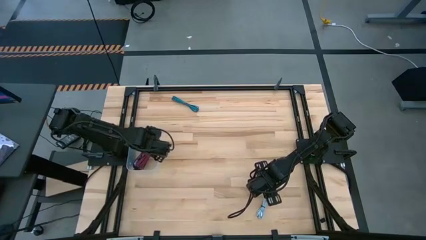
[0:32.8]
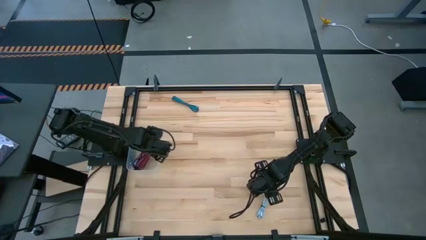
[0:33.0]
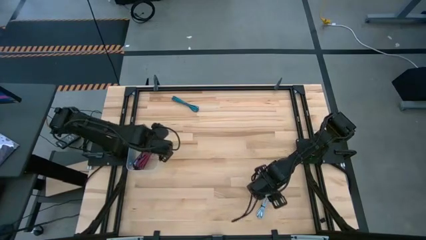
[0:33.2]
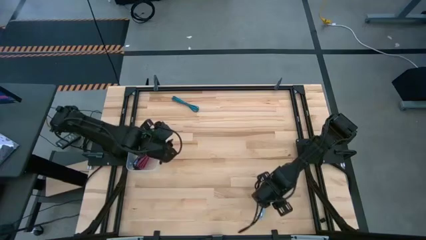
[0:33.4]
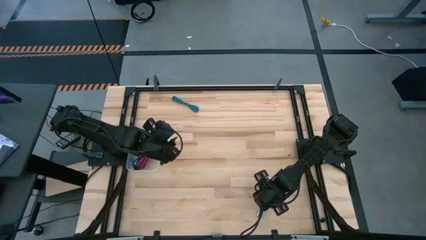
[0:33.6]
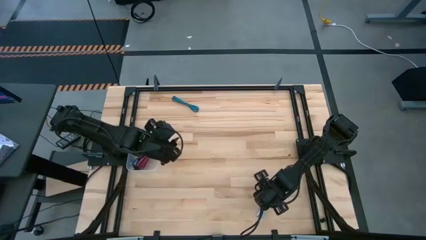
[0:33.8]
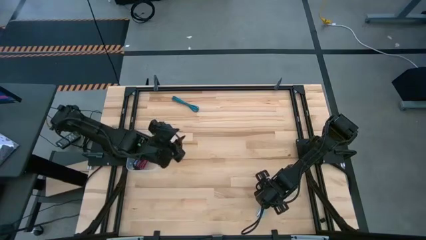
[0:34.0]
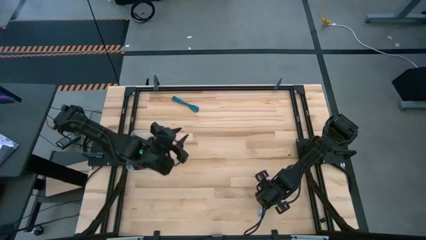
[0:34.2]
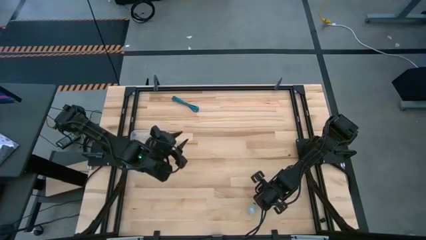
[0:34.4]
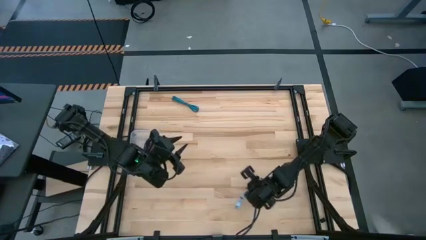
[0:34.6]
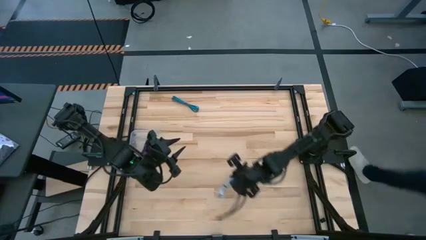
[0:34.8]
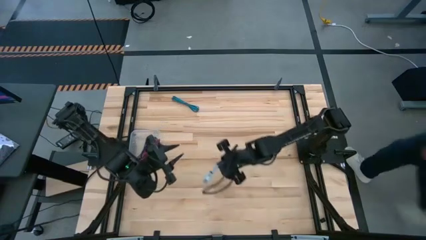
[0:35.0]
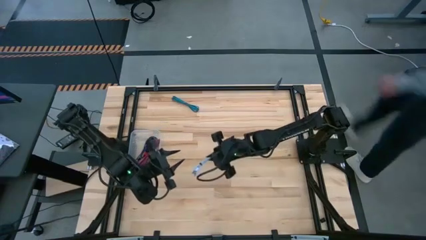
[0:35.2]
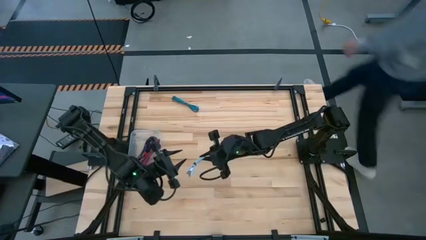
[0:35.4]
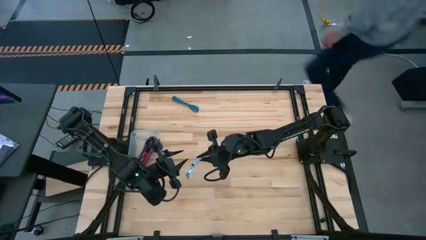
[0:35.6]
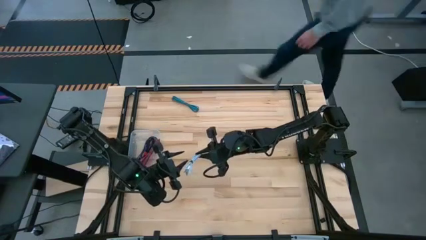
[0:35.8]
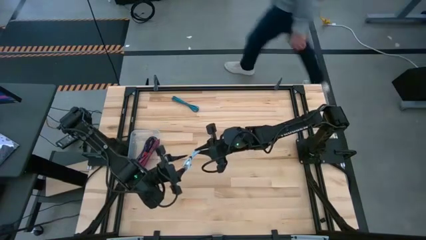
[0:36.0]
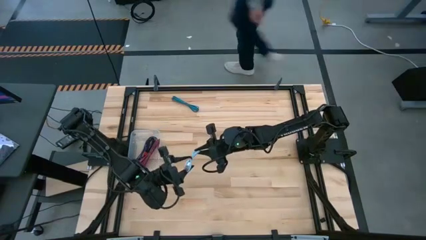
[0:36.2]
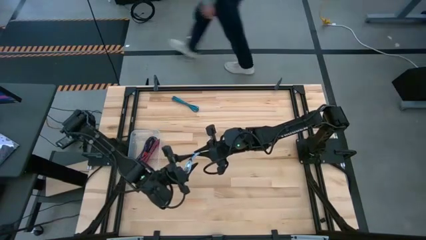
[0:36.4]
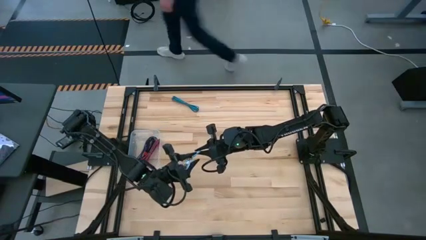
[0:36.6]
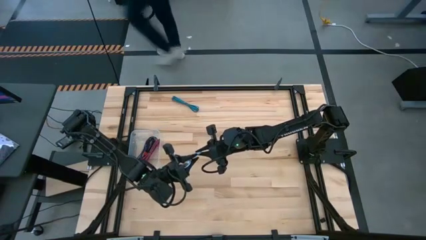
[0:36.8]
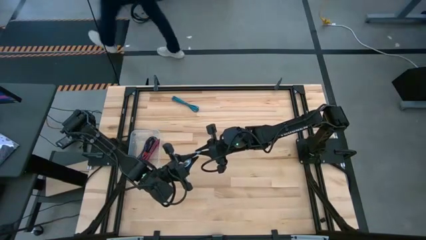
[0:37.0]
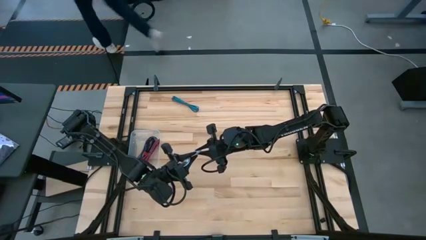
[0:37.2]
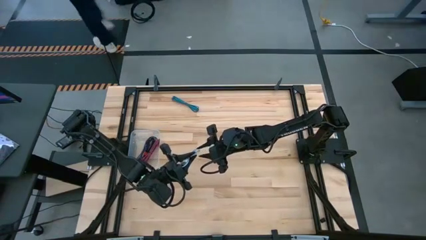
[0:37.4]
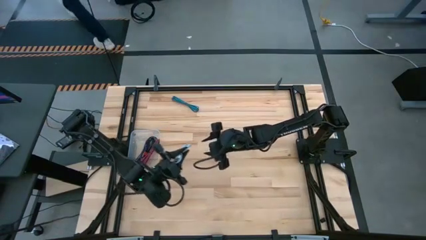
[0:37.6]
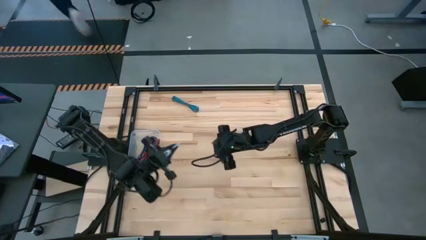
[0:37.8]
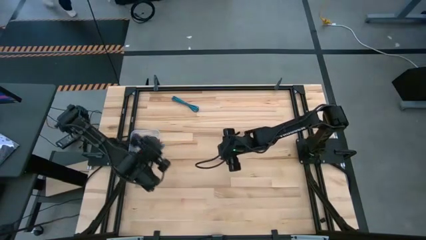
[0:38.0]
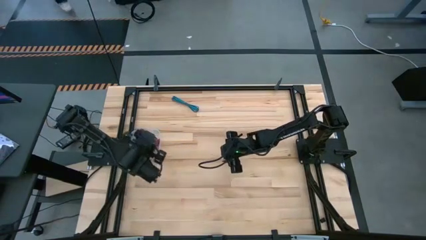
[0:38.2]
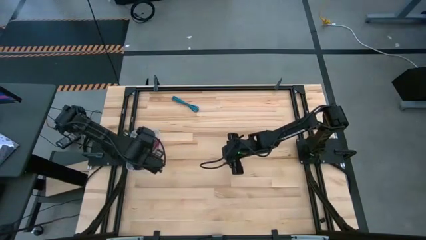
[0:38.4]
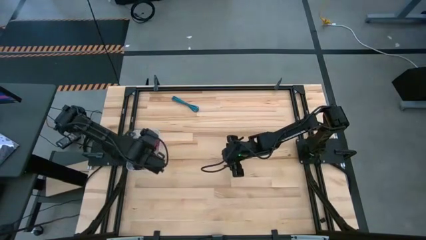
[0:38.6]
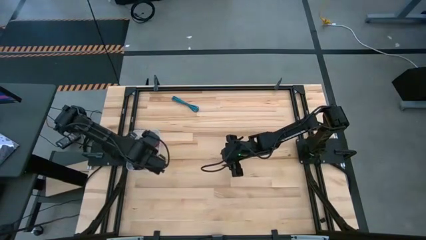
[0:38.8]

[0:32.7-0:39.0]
Task: Pick and place USB-C Cables
Put the light blue charger cable into the transparent bin

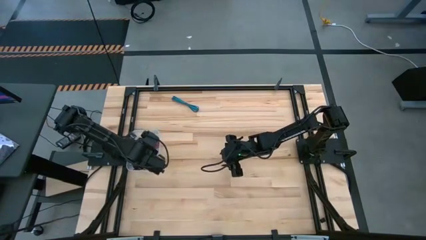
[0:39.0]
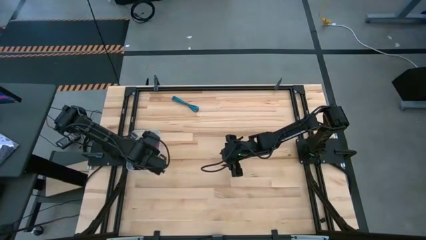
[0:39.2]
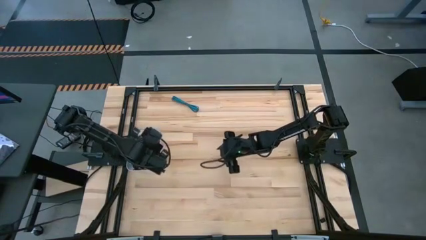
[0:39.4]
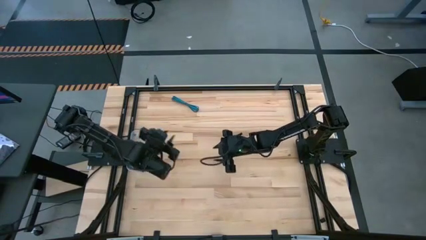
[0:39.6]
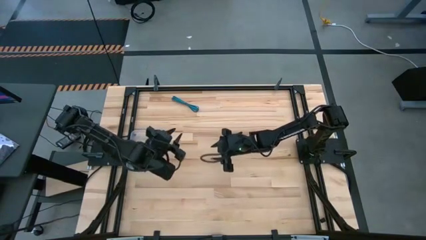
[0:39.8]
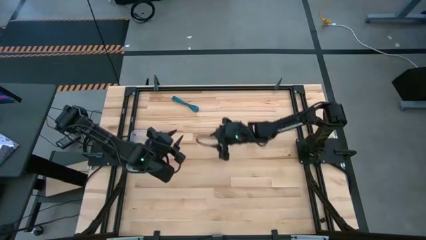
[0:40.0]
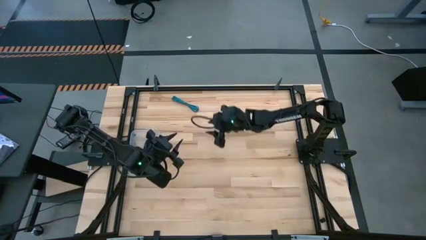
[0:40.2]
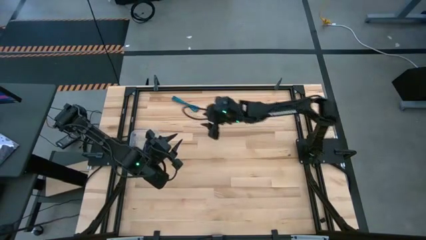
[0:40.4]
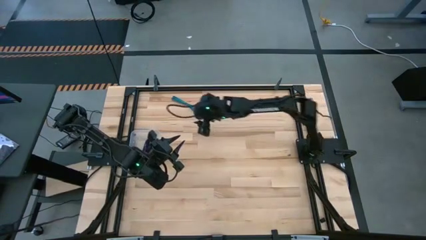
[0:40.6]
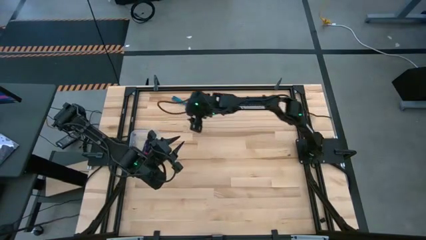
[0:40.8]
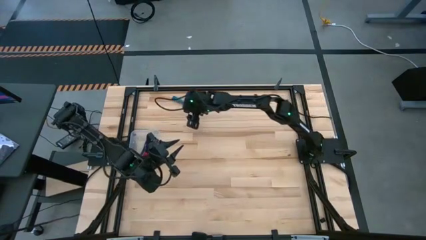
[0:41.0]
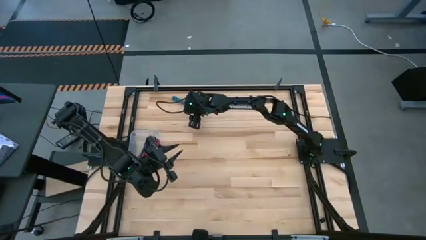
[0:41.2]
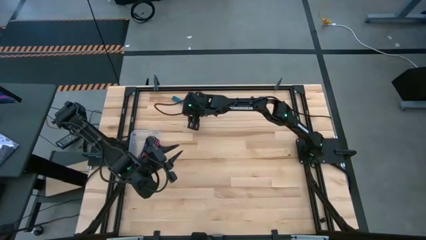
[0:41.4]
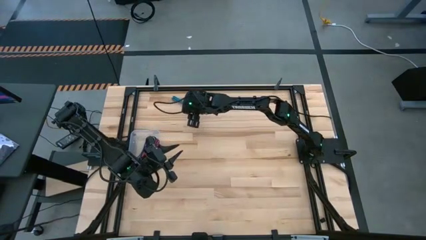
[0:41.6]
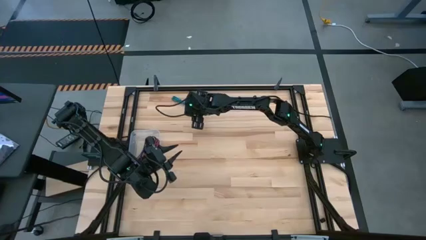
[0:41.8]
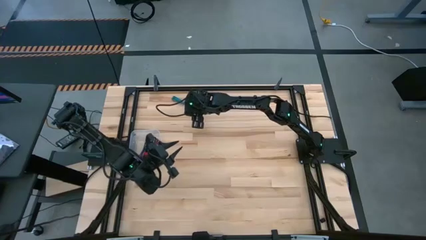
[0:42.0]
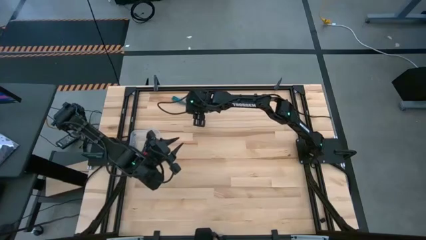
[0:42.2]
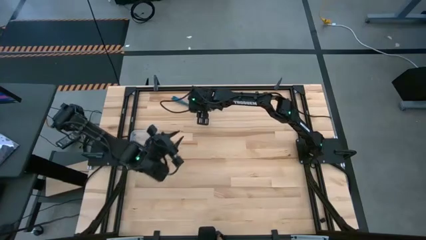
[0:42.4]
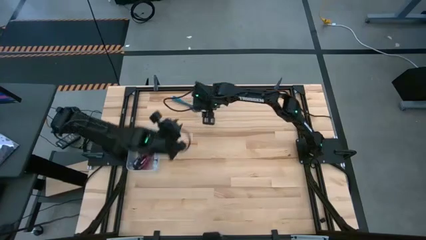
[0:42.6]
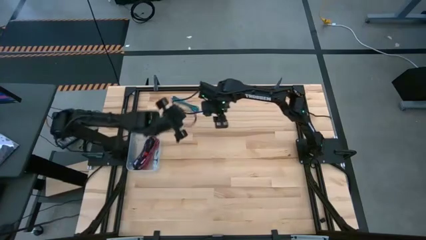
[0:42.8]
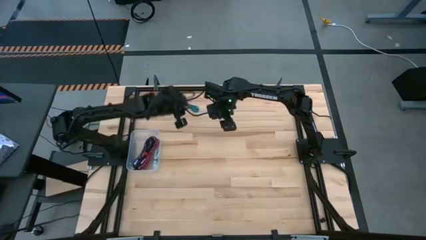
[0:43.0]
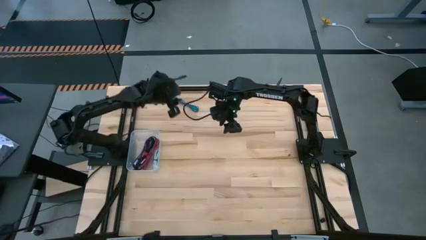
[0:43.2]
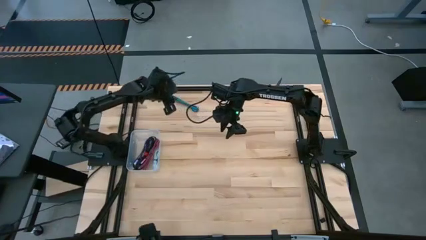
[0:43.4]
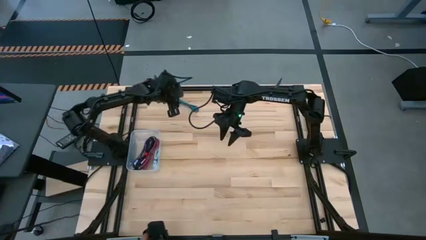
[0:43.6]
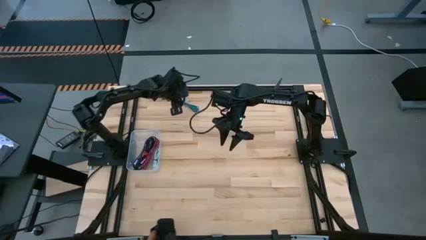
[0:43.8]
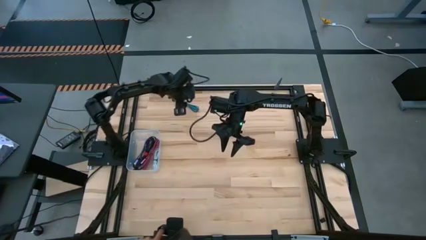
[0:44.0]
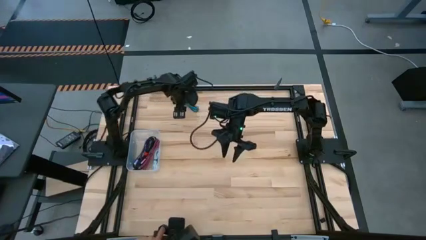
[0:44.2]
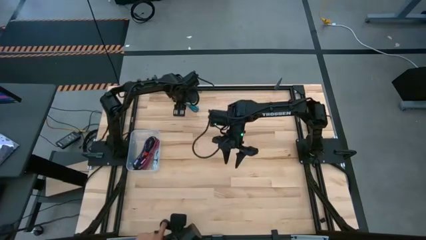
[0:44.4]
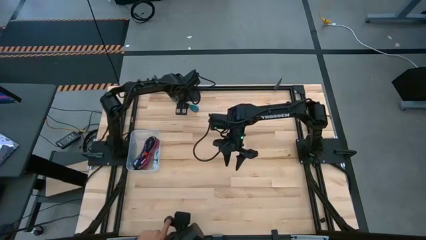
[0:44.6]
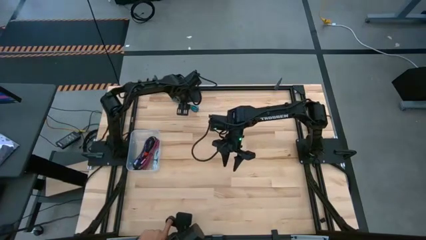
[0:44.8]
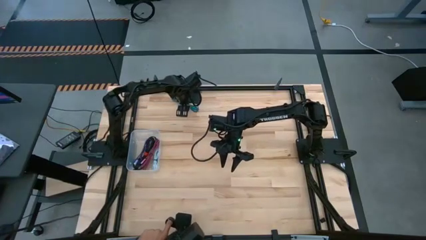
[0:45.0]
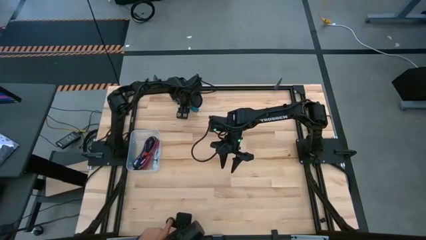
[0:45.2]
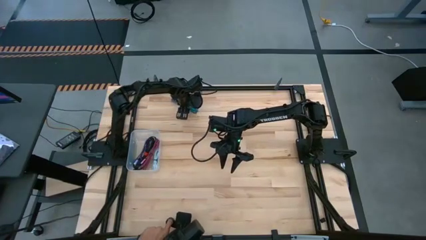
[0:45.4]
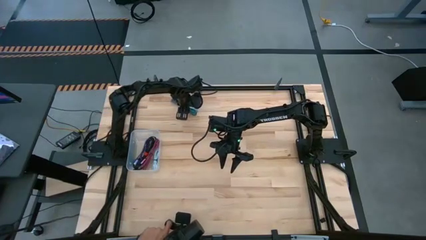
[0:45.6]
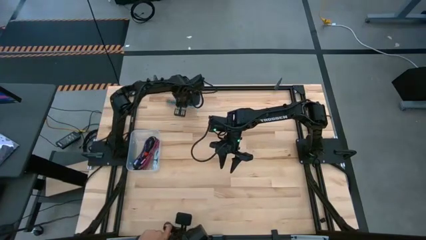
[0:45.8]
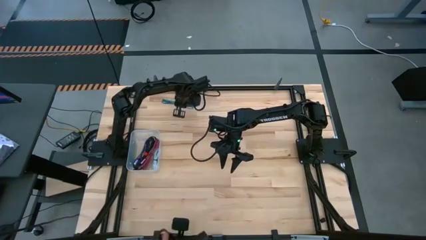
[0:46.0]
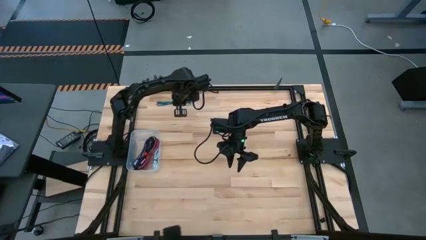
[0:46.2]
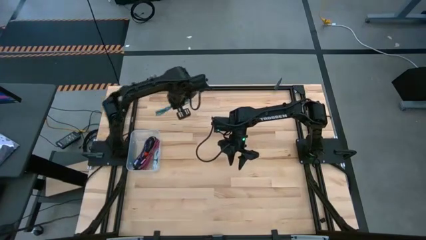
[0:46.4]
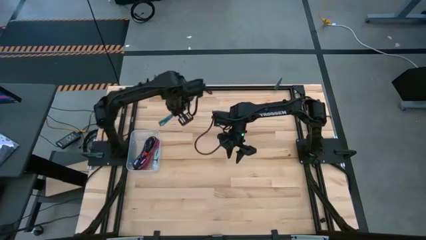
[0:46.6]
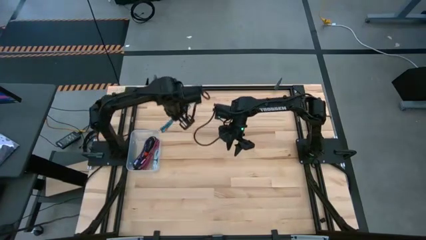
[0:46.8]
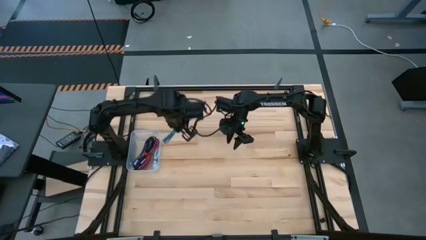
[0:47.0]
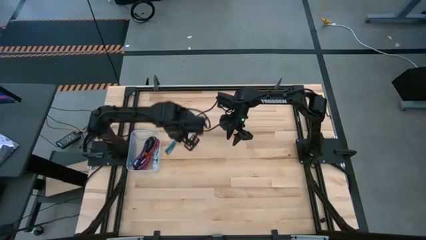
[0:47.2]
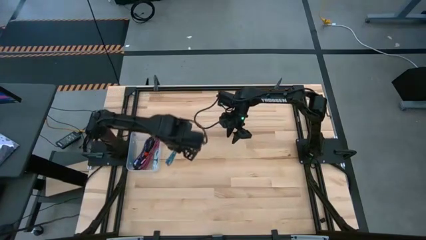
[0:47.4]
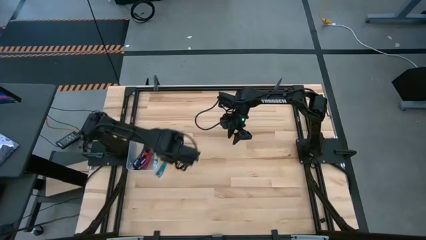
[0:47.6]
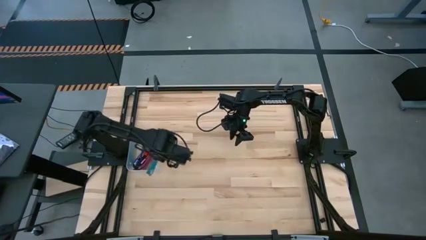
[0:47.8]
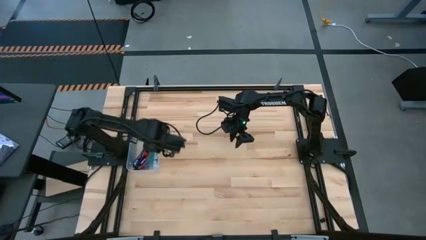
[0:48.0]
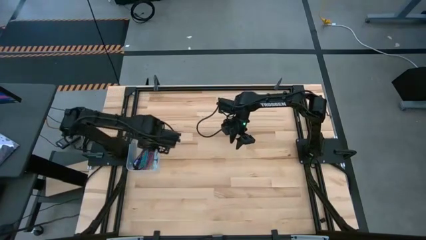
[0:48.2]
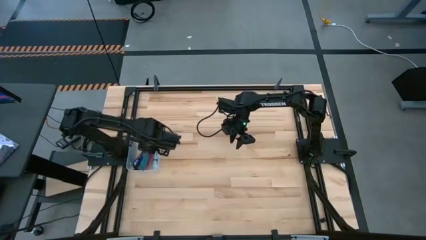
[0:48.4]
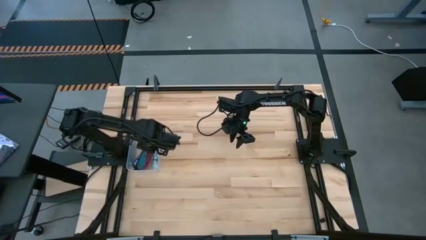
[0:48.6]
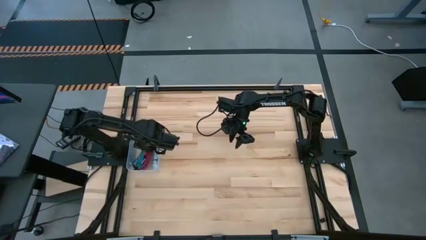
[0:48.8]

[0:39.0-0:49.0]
Put the blue black charger cable into the transparent bin

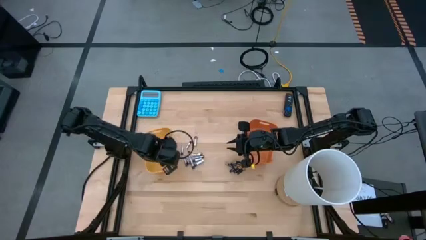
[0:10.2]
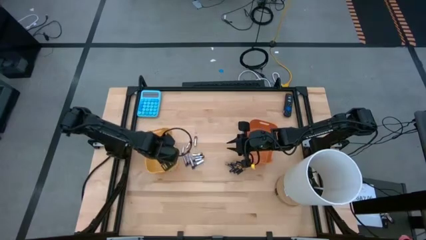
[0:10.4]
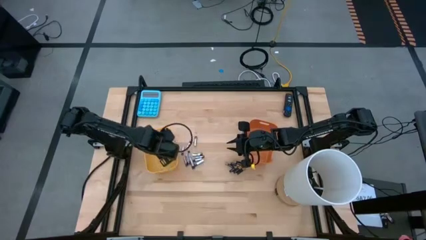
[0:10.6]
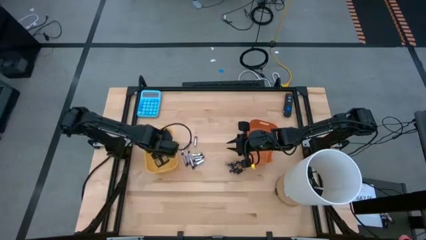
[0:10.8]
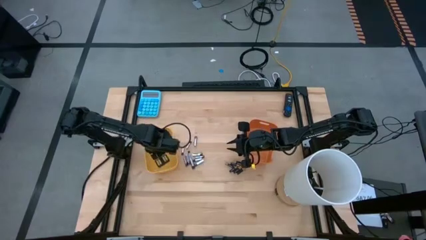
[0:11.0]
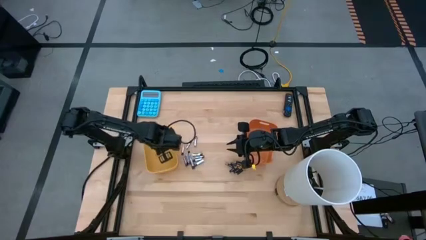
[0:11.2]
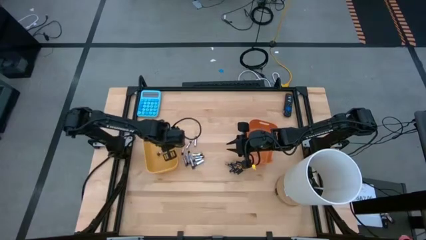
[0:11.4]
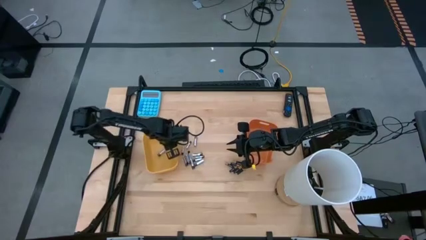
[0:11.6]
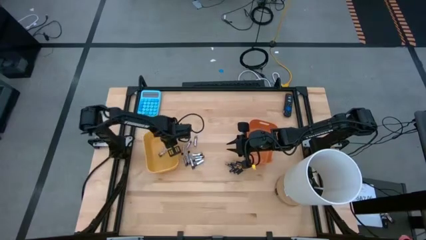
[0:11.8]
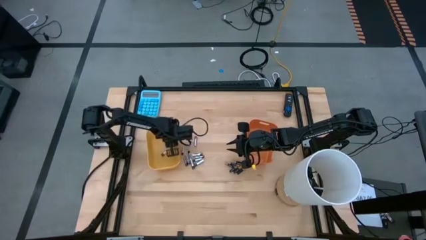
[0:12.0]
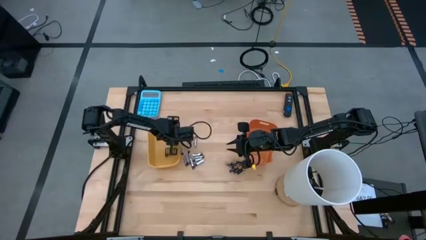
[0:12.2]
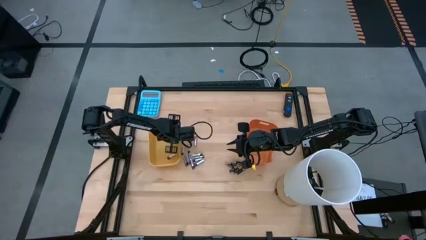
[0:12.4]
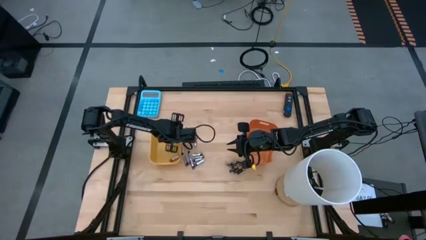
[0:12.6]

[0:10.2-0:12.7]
Task: Sort batteries
Adjust the yellow bin
